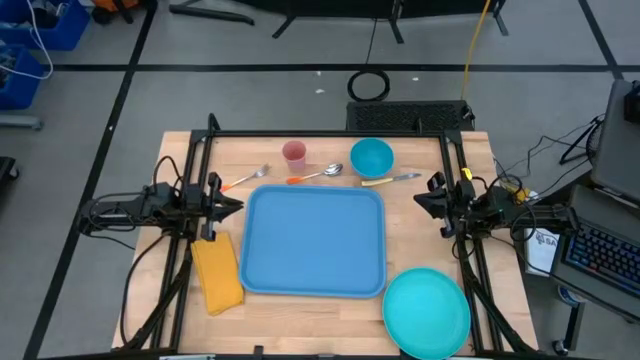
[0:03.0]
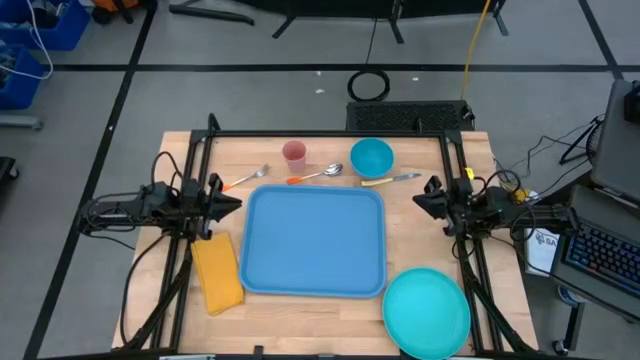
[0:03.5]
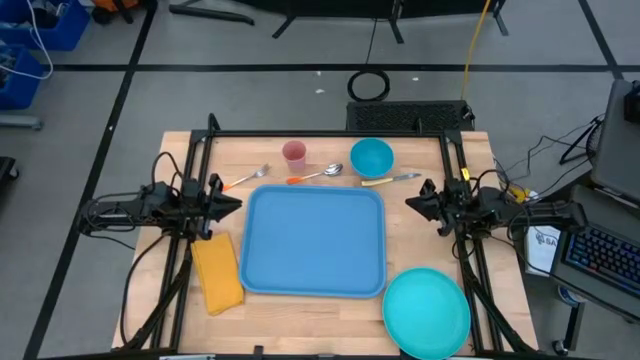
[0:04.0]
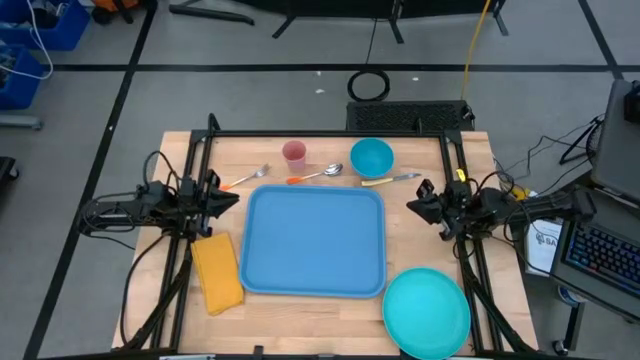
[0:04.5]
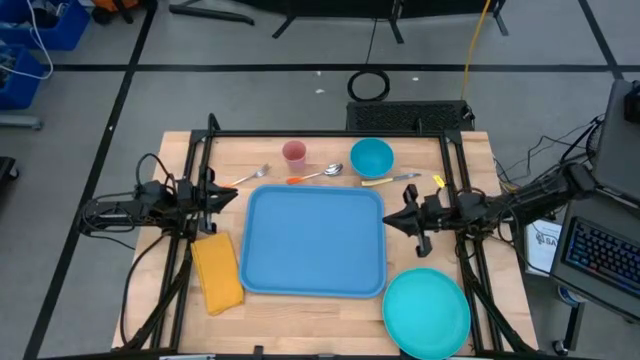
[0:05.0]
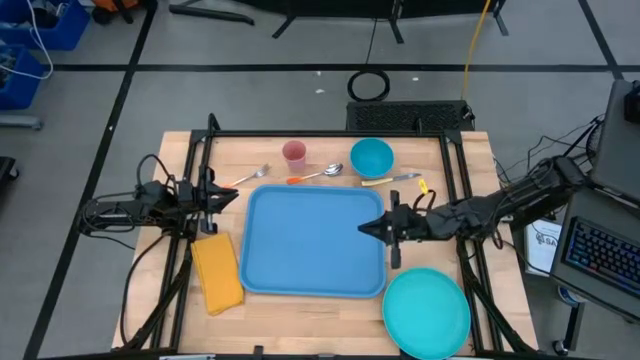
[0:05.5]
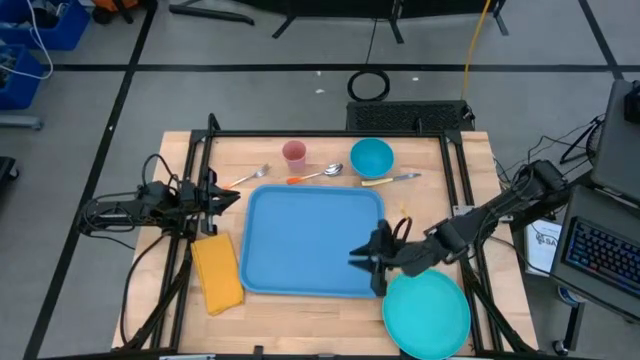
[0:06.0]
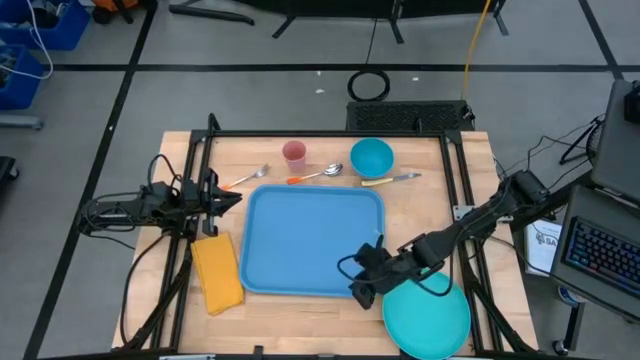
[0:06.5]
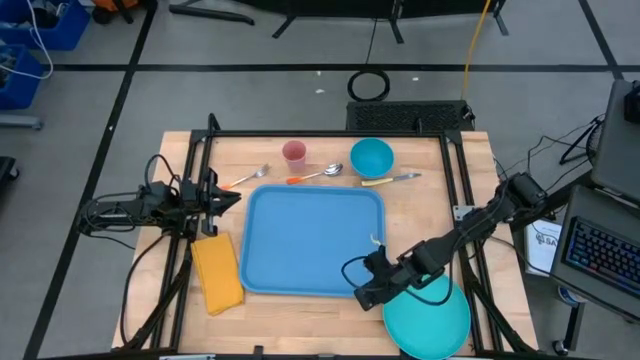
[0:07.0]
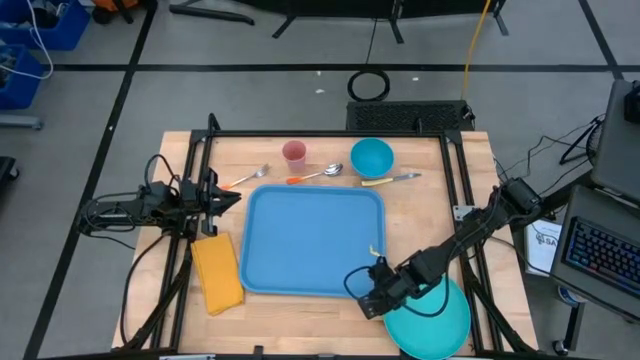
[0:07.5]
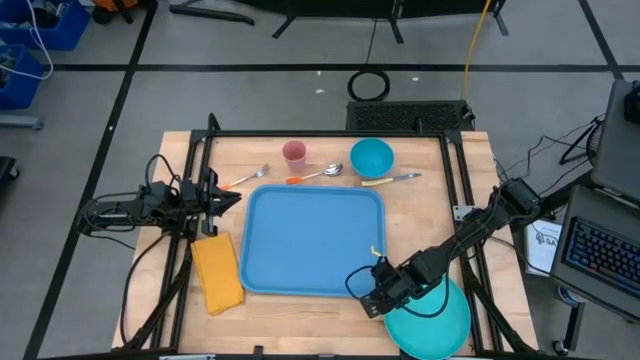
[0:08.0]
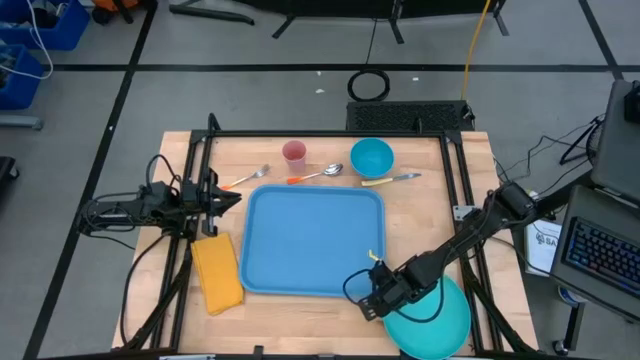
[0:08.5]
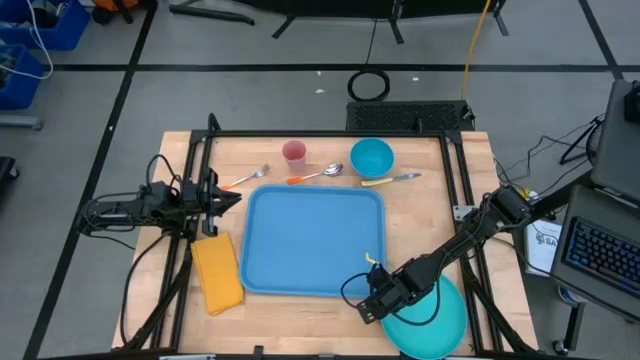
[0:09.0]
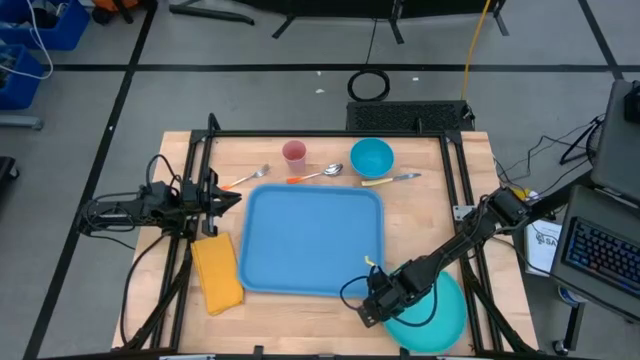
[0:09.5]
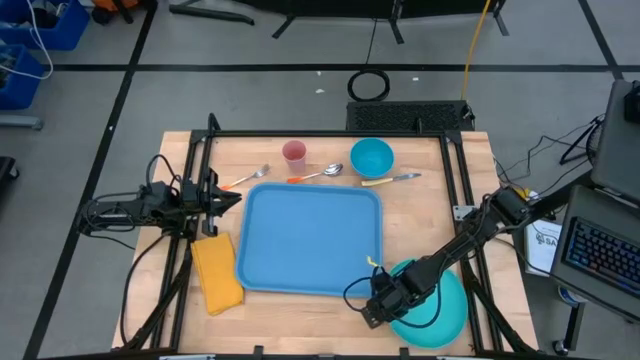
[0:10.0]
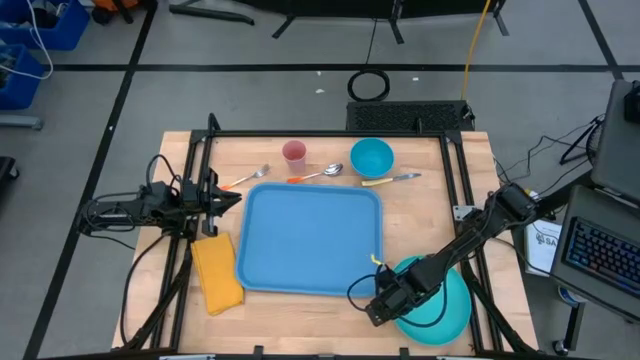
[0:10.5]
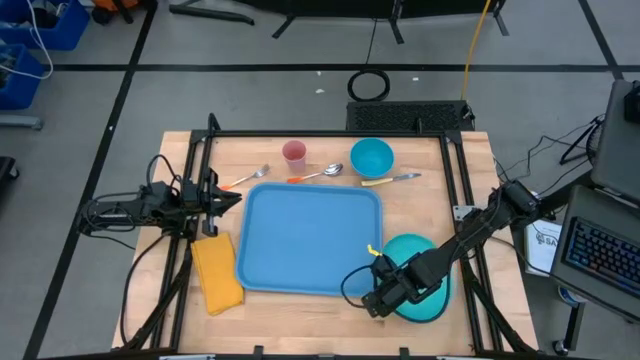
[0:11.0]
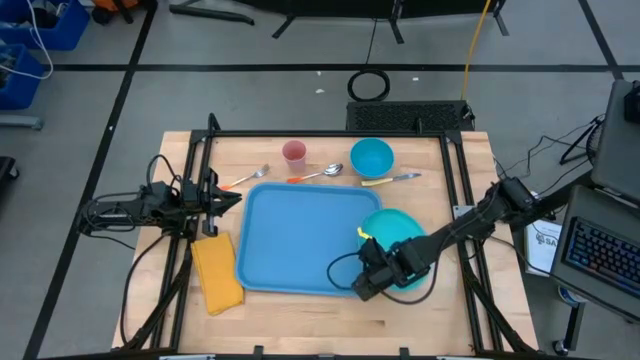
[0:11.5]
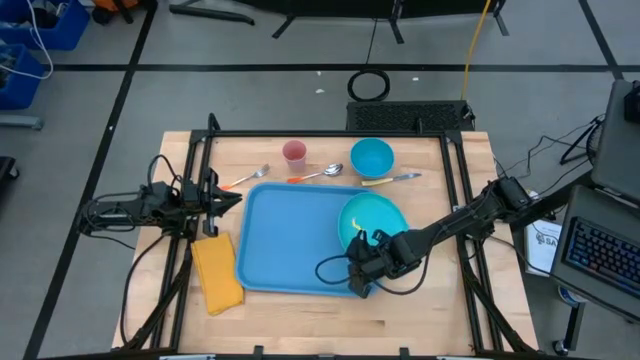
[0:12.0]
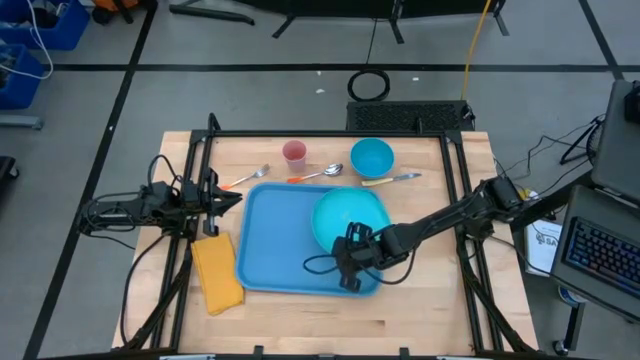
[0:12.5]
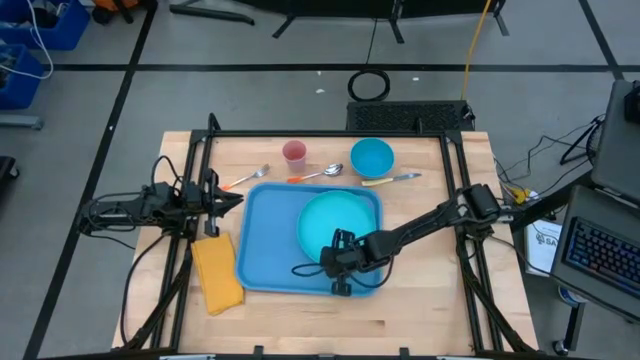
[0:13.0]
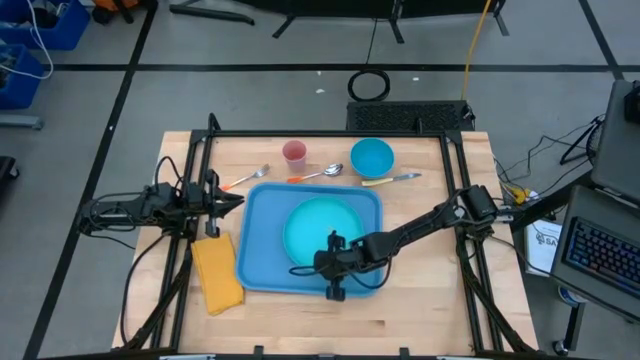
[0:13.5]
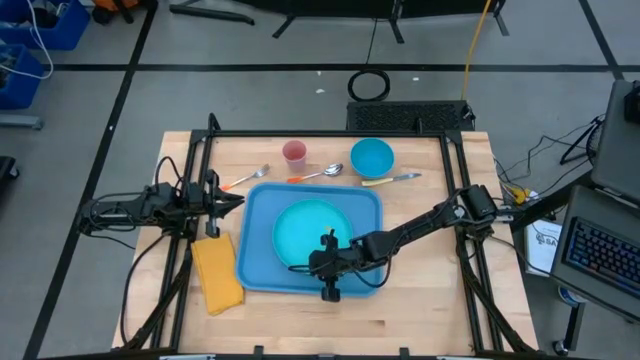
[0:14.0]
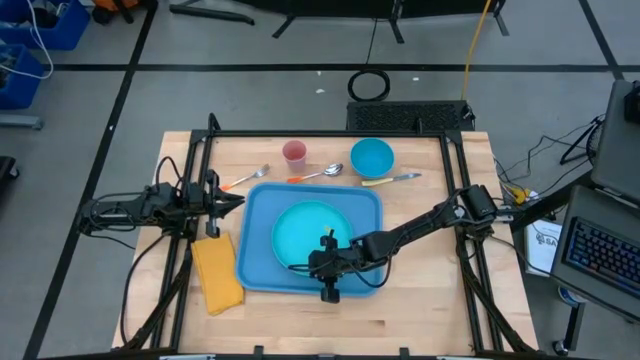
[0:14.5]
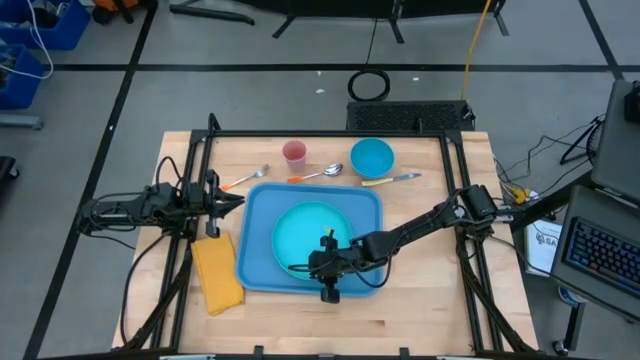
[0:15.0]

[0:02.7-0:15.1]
Task: Set up tray
Put the plate on the serving tray

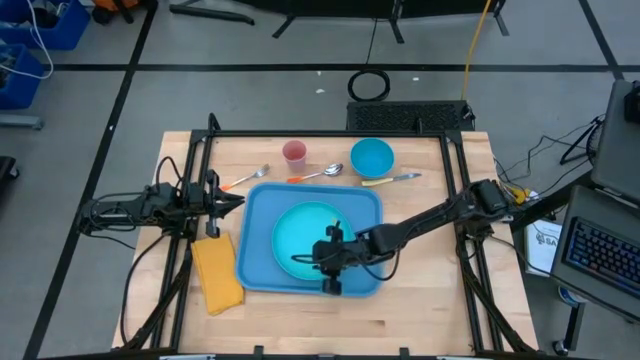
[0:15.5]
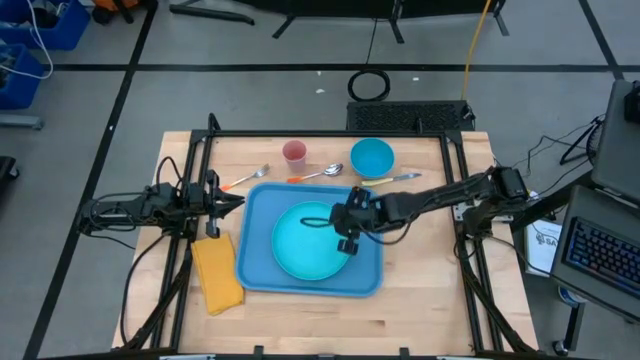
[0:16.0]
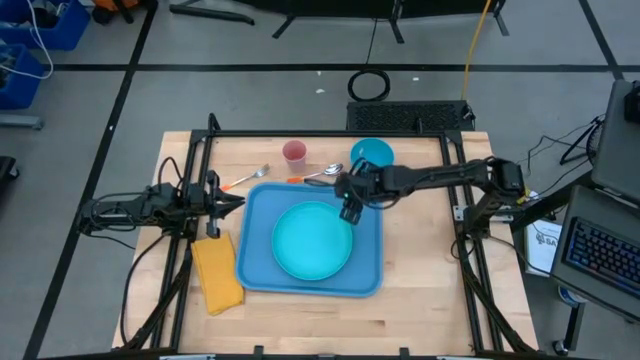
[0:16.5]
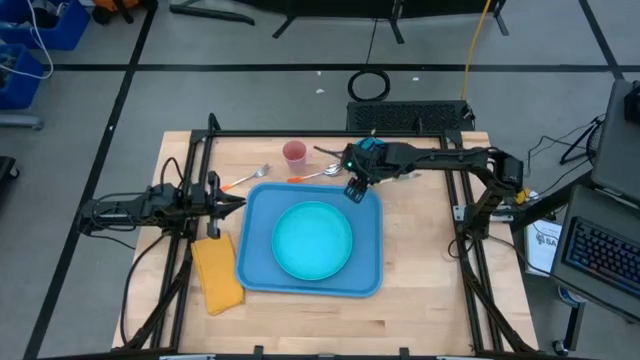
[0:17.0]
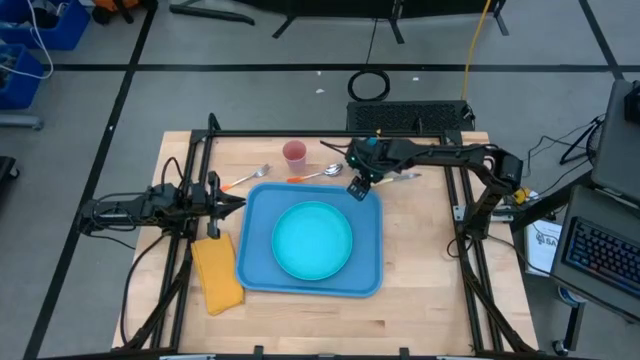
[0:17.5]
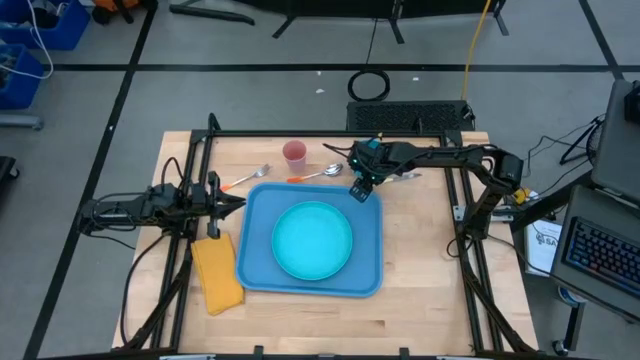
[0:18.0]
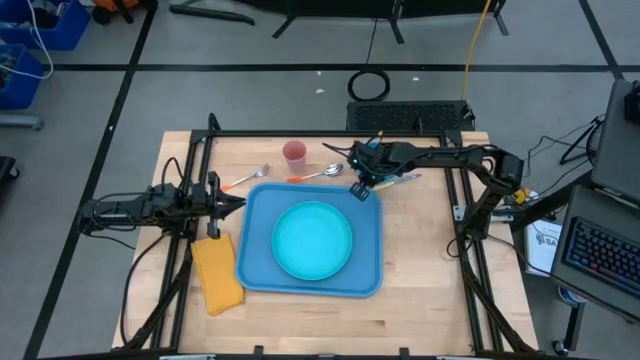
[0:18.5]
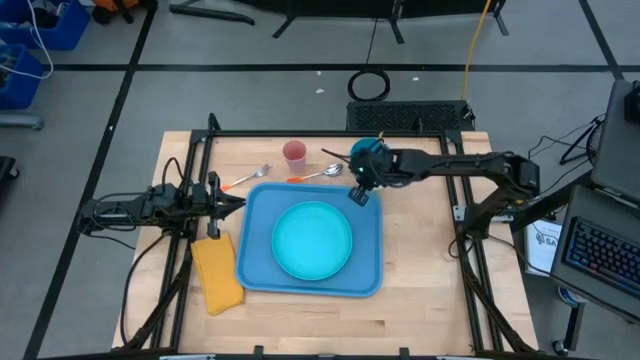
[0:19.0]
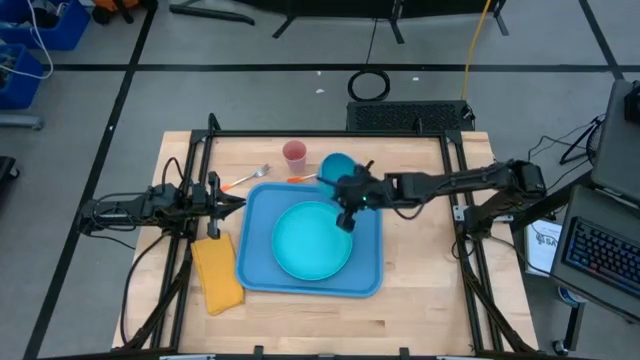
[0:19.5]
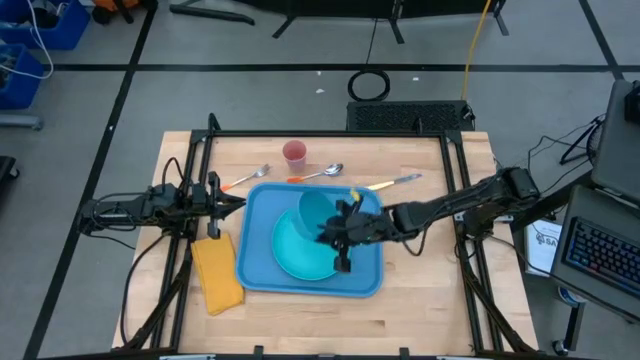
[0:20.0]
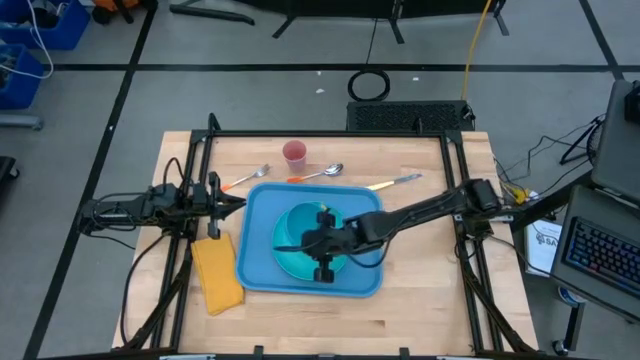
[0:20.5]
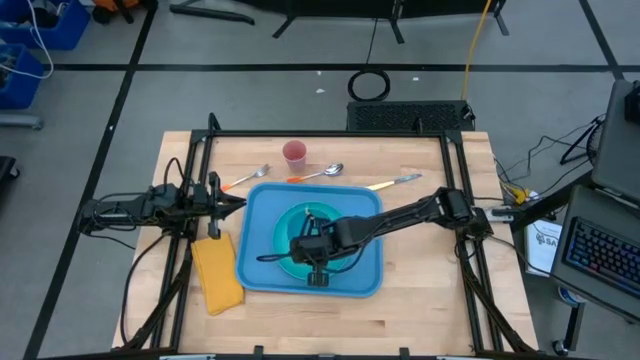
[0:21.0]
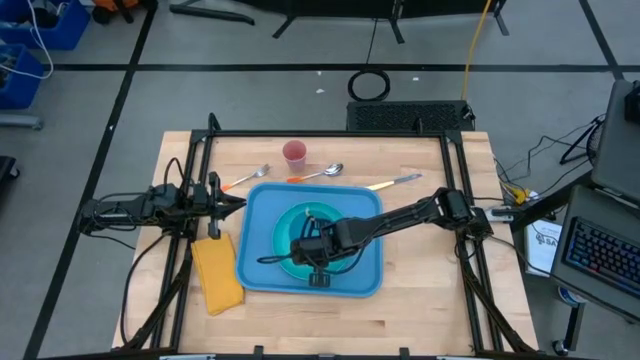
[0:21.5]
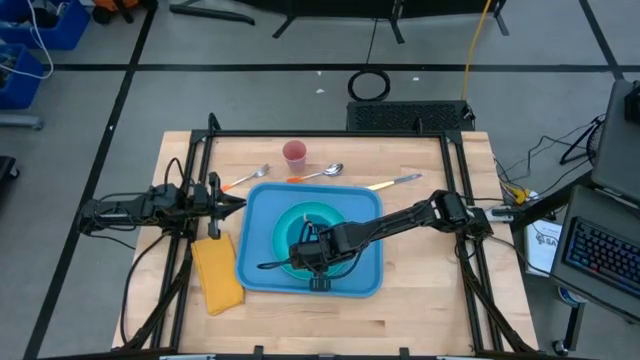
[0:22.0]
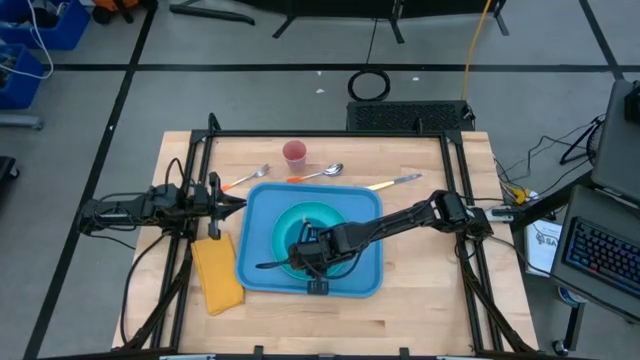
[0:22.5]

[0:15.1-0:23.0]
Put the bowl on top of the plate

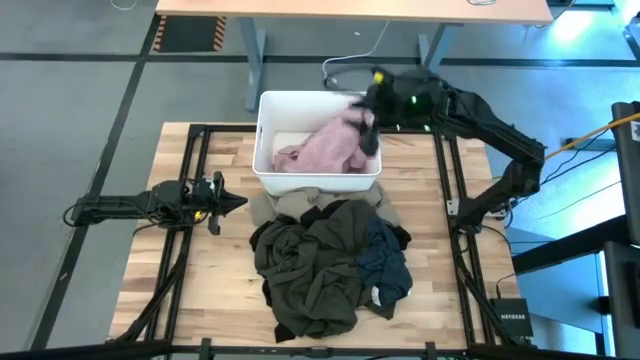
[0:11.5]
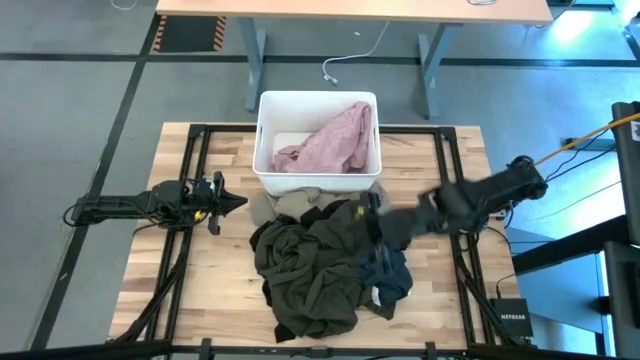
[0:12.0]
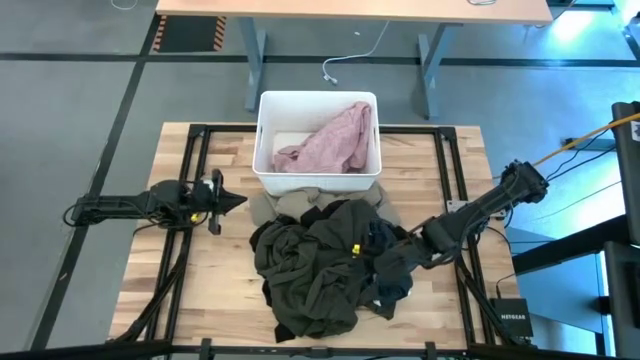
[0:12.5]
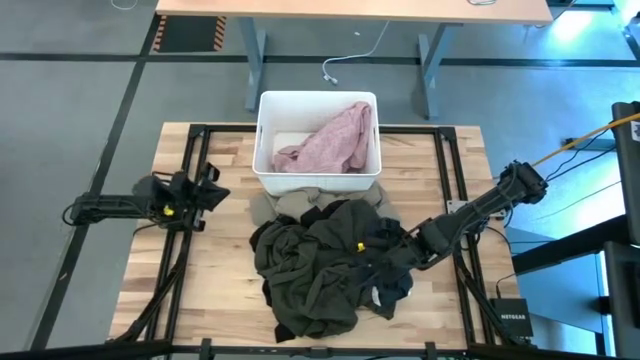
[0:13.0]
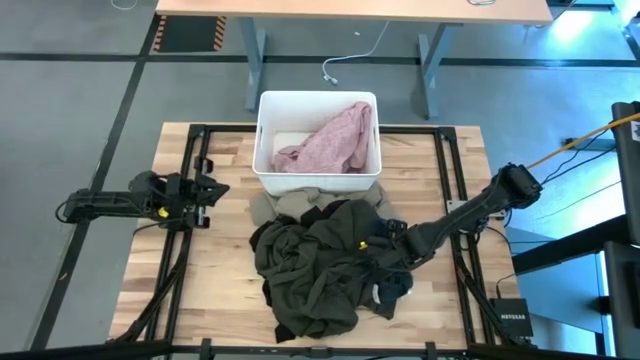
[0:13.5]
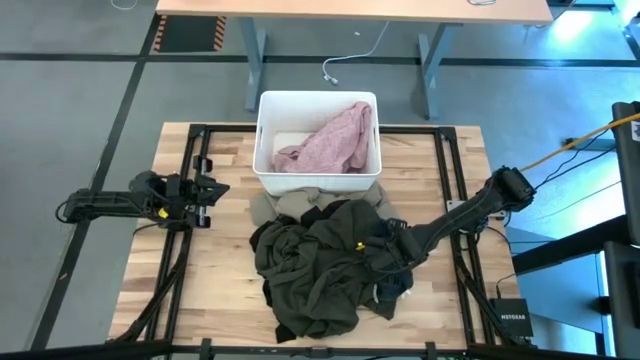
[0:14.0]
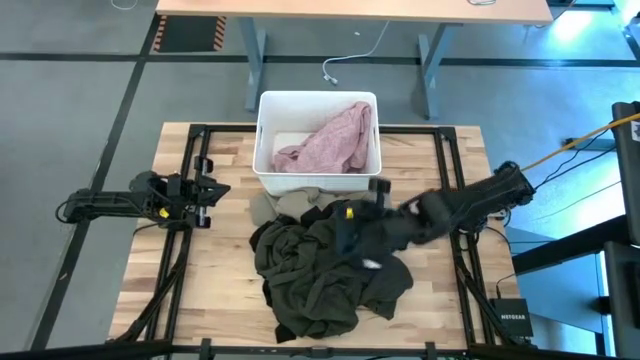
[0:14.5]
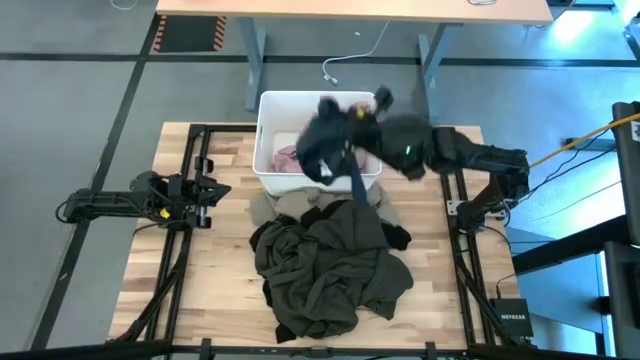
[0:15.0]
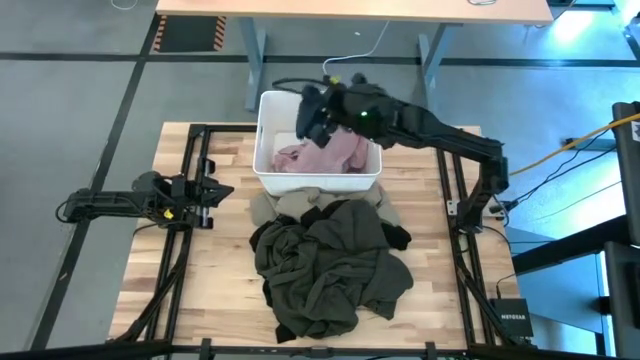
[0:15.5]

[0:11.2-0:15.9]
Task: Sort clothes
Put the blue short into the white bin
